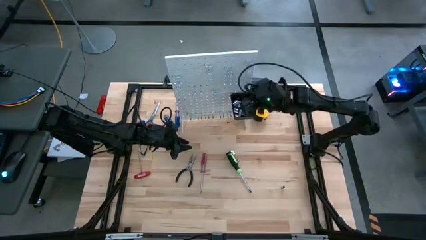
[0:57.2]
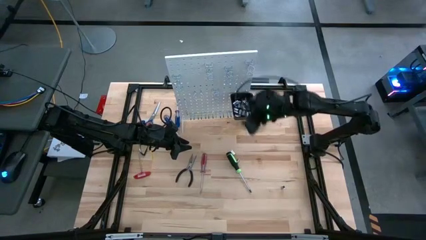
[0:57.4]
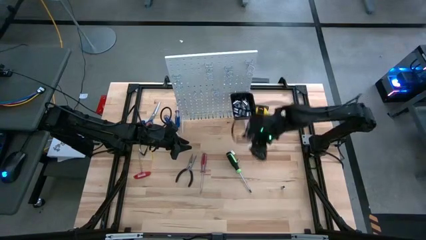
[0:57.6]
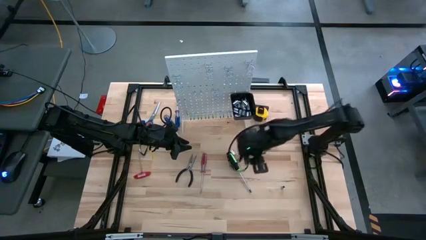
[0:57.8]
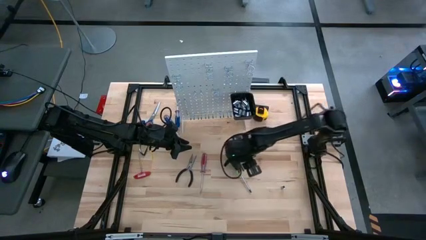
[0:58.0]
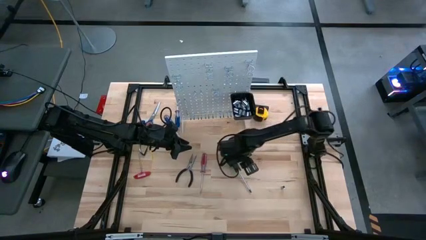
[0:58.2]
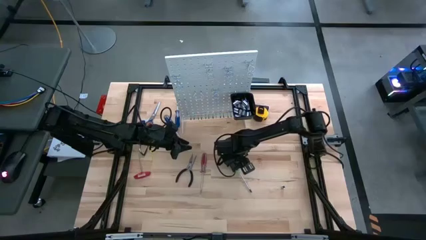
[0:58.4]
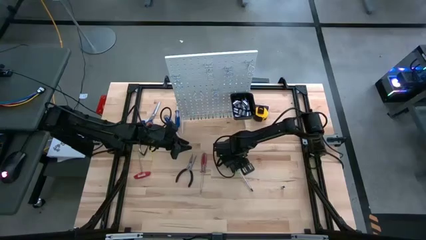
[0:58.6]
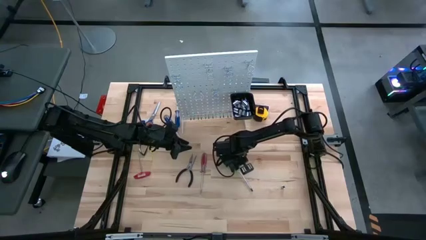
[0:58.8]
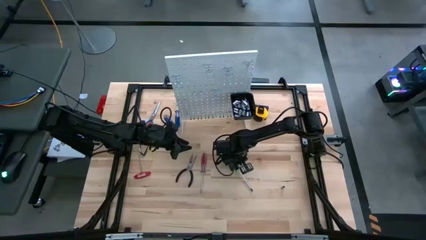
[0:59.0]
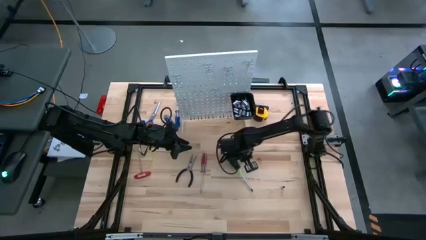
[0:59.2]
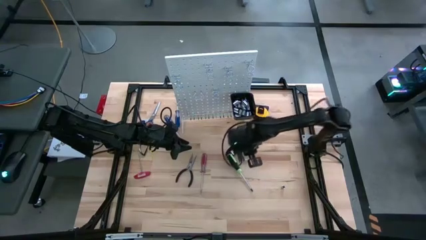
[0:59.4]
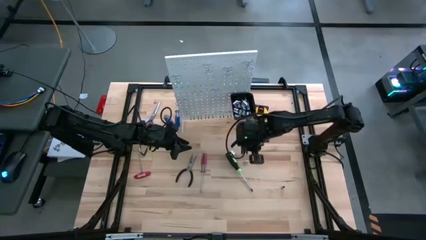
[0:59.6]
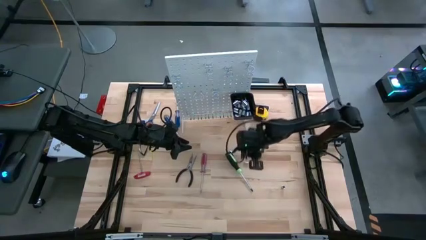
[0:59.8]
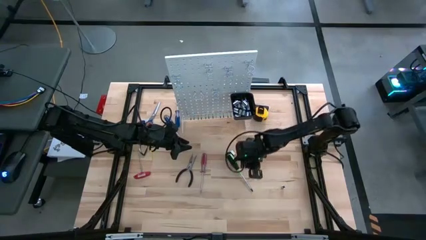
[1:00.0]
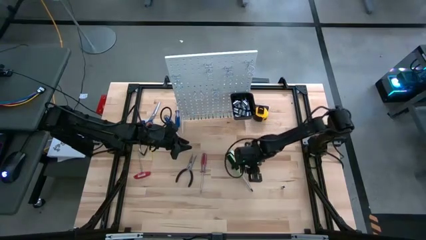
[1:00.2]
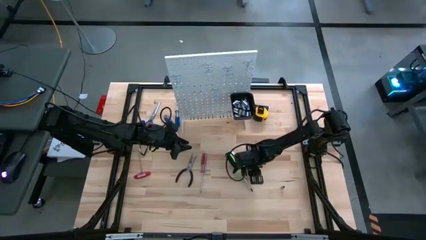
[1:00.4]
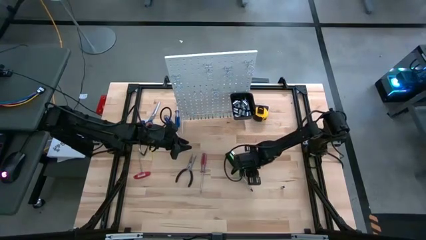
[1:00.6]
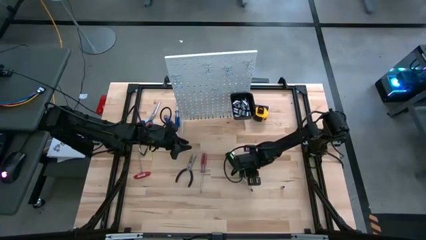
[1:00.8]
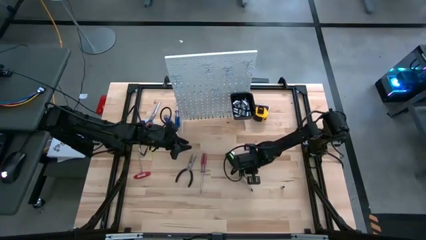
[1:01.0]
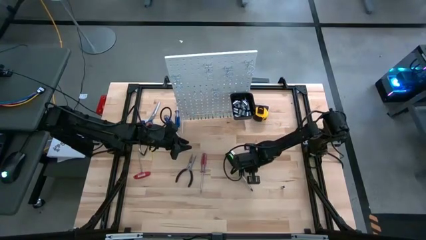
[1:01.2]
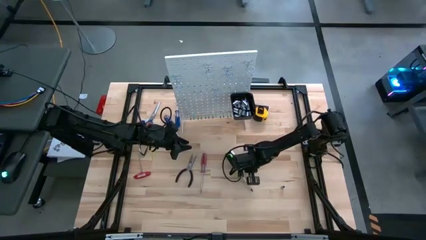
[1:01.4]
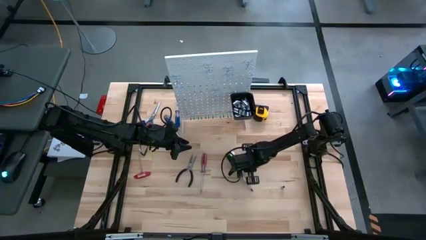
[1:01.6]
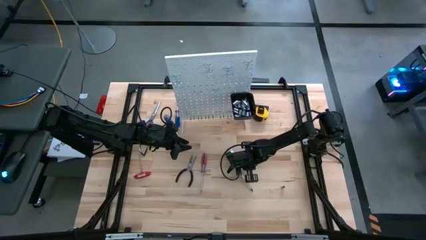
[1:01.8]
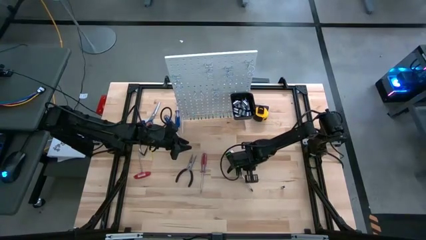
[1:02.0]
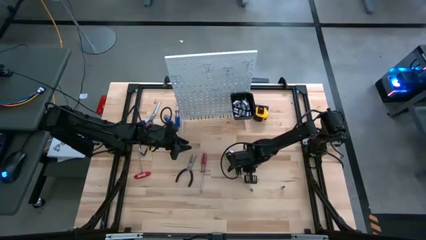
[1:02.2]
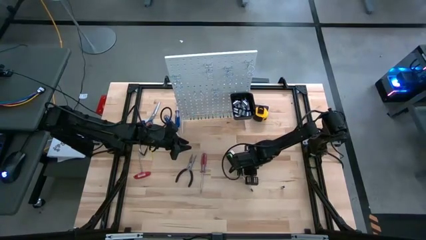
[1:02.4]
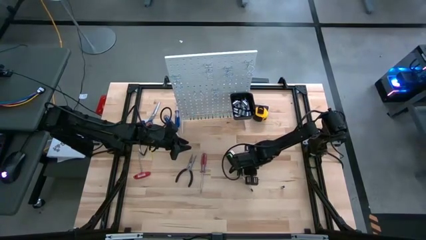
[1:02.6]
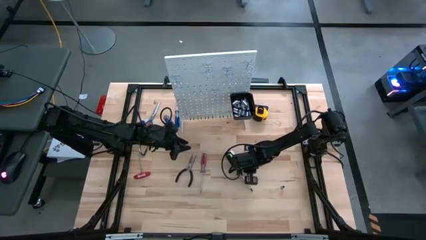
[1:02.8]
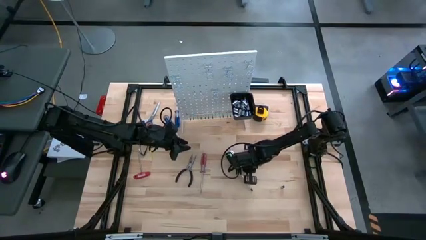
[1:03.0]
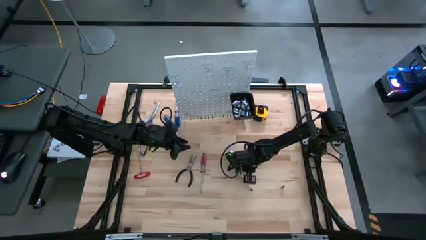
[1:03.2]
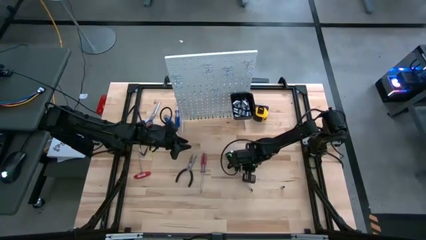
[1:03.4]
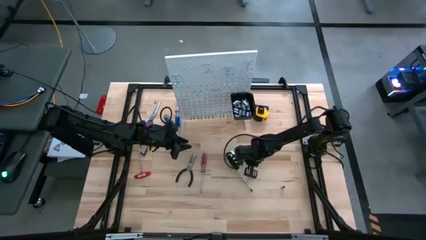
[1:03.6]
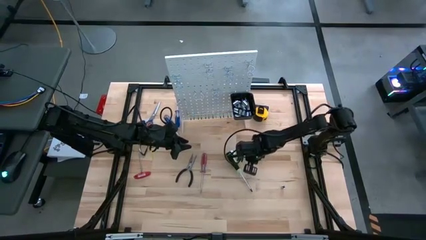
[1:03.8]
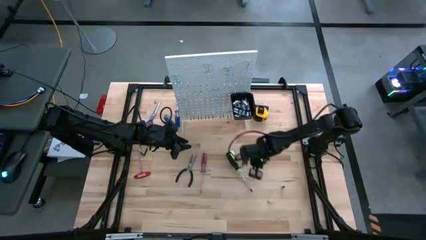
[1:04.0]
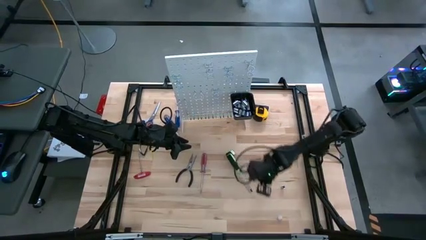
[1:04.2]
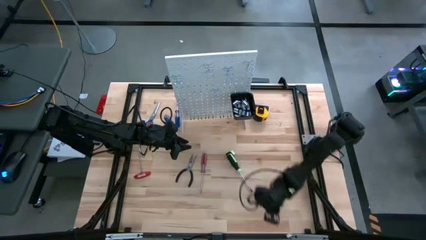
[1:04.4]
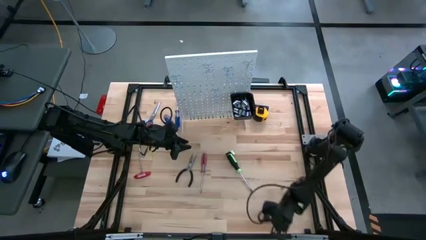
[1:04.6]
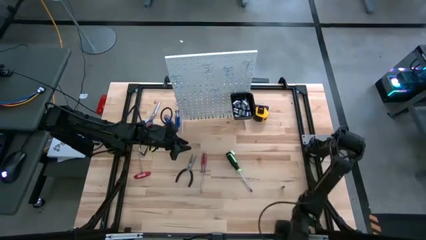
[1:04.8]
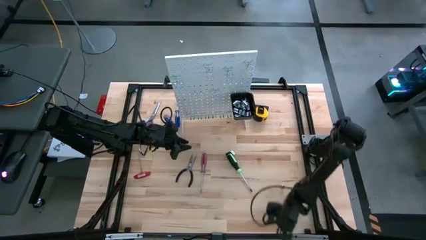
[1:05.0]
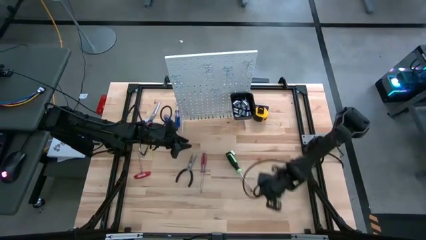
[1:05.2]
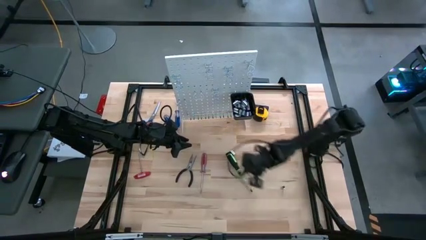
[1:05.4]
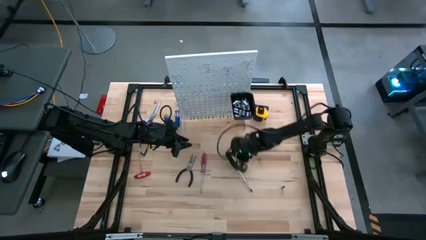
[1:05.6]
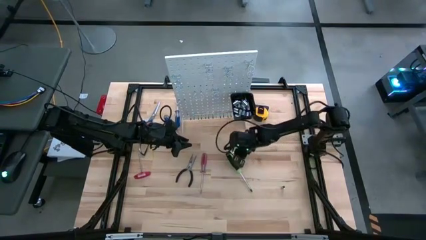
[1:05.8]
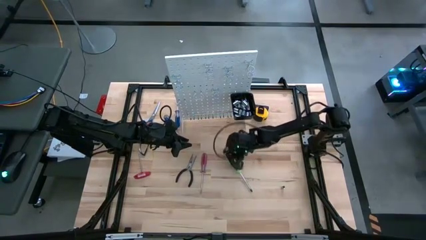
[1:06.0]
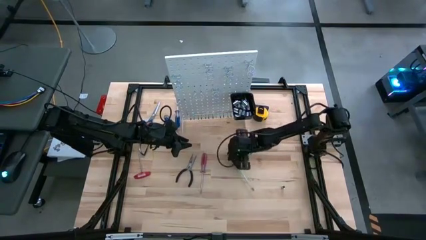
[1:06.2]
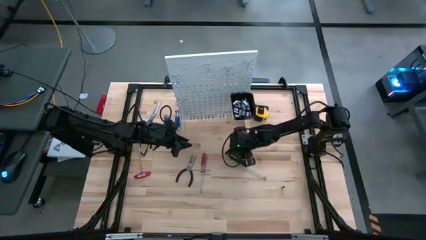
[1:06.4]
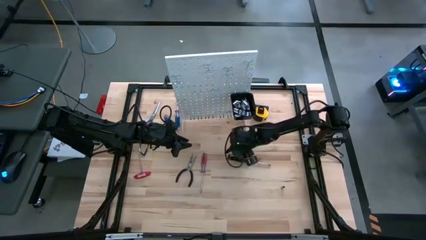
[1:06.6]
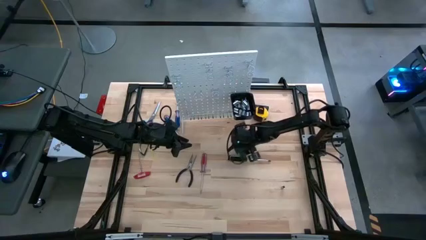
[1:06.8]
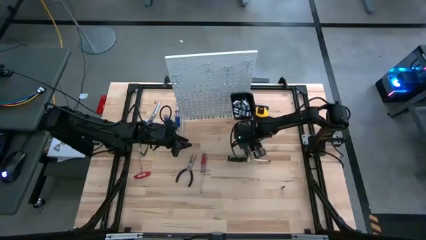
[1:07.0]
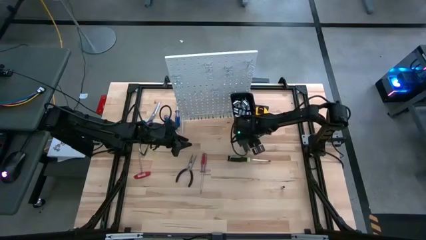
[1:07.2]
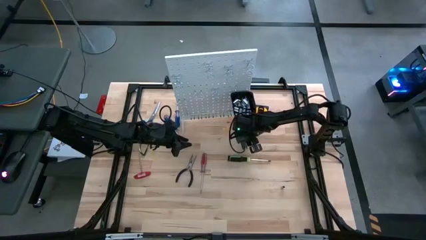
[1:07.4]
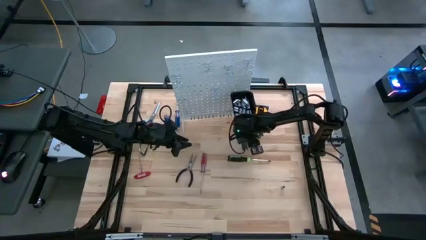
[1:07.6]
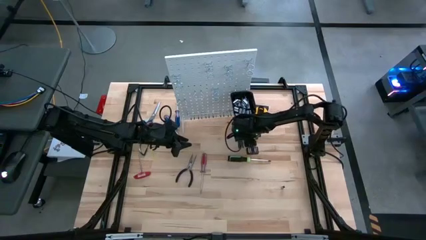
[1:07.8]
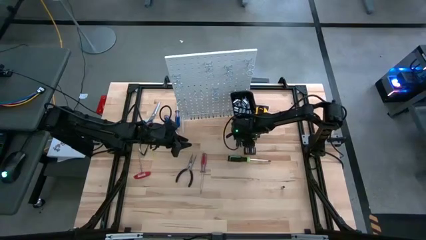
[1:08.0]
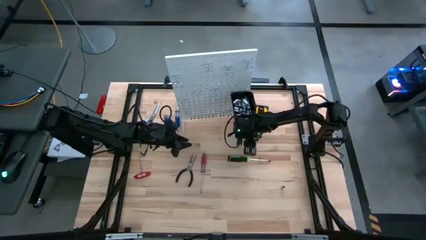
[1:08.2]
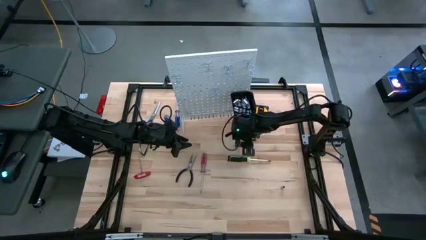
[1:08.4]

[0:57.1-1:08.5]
Task: Hang tools onto peg board
Put the silver socket into the black bin on the peg board

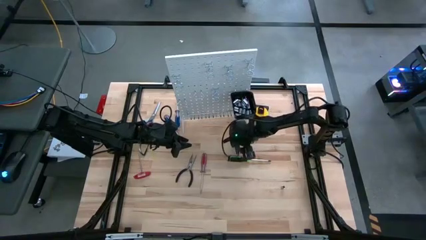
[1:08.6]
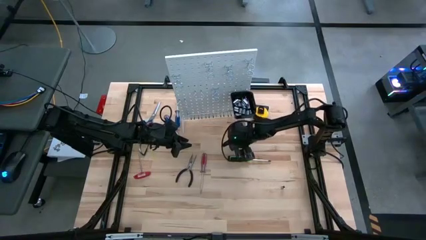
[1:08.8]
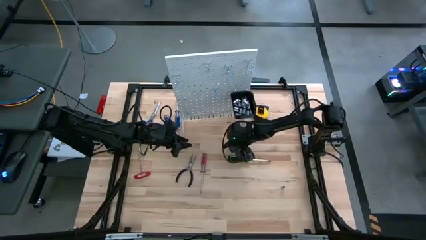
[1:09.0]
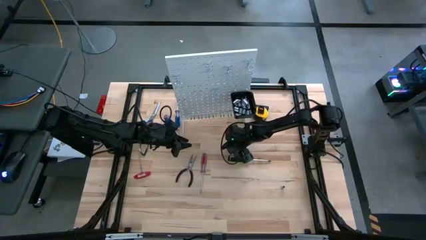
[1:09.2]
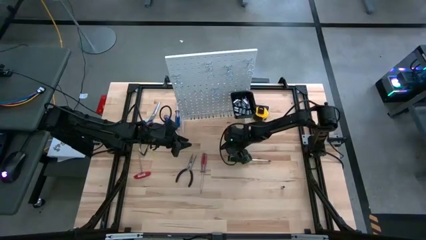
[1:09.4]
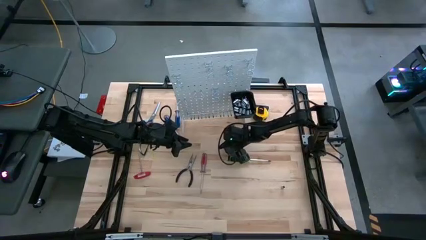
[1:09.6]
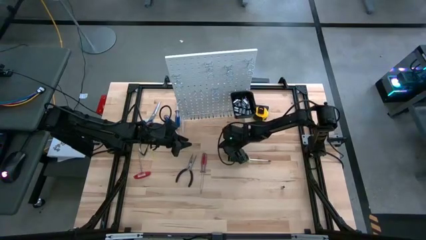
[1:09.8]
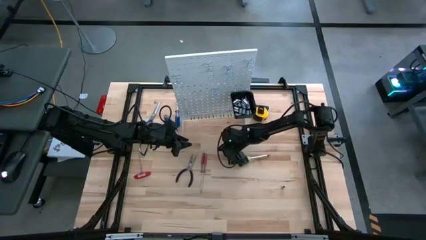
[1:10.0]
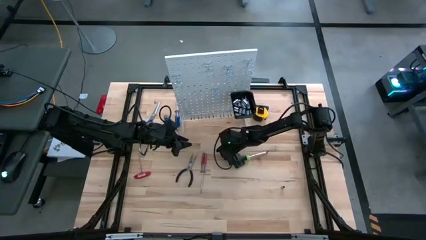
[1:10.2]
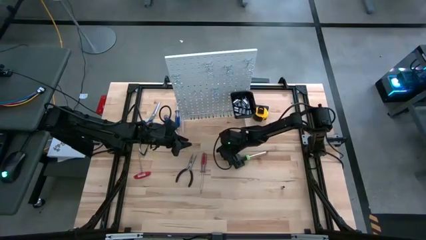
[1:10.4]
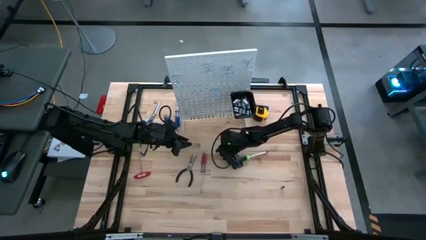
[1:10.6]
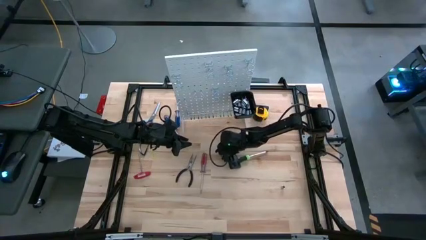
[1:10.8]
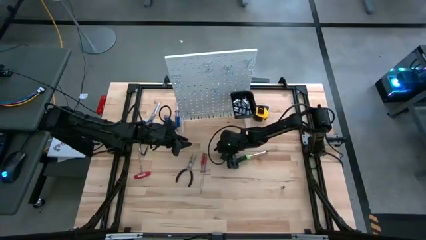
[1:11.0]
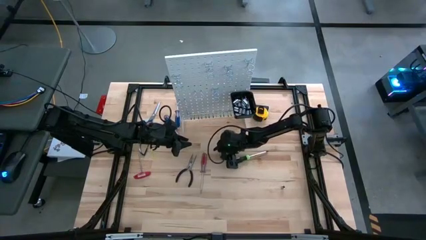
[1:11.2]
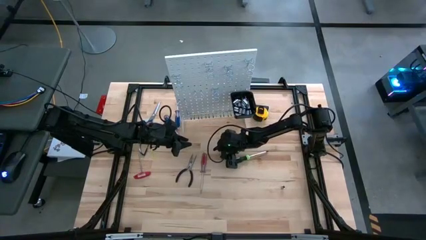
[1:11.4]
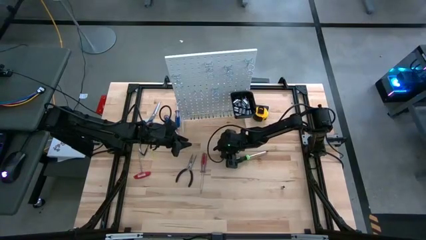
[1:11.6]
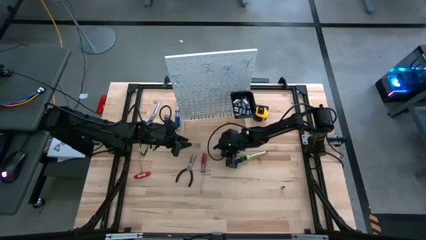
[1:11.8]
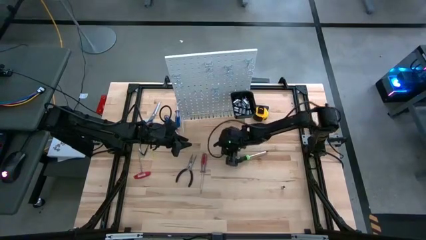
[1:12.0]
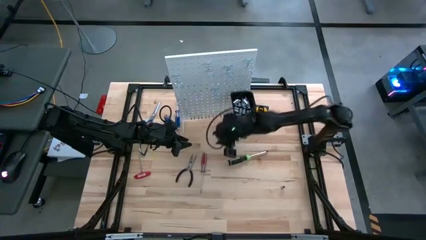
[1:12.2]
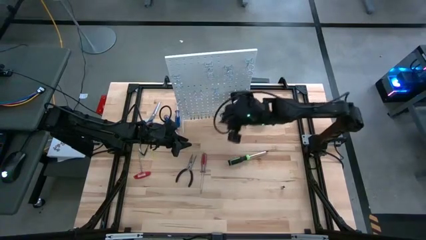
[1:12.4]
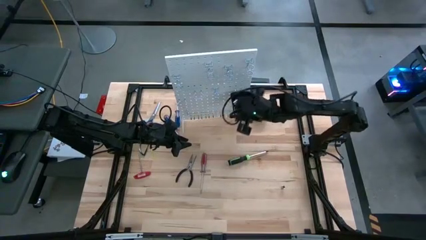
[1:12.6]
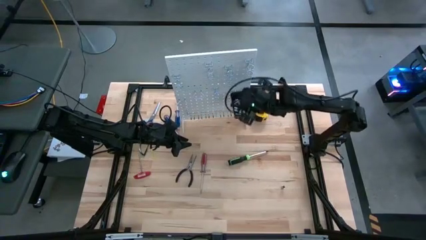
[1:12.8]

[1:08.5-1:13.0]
Put the silver socket into the black bin on the peg board

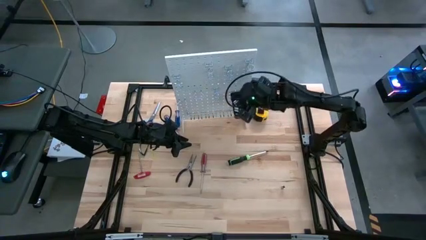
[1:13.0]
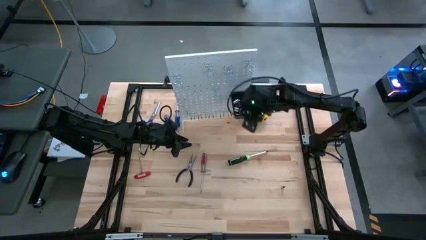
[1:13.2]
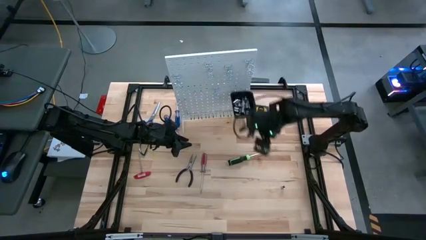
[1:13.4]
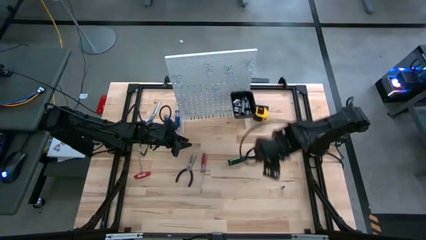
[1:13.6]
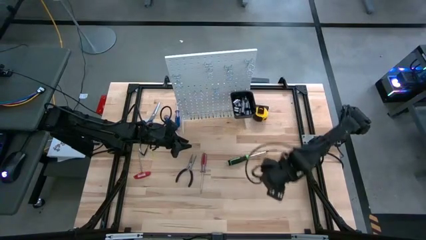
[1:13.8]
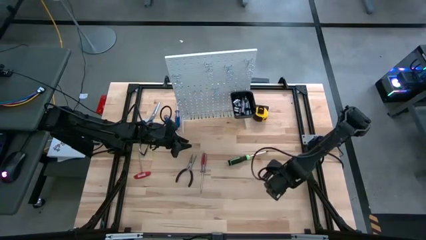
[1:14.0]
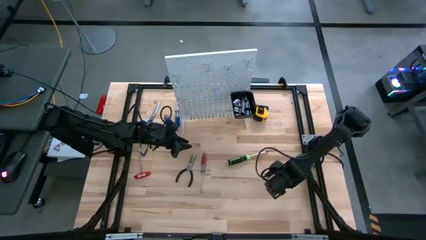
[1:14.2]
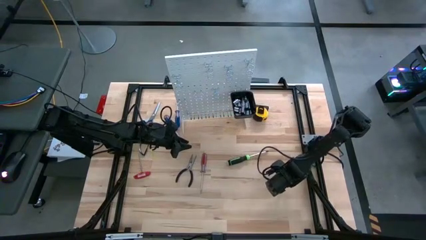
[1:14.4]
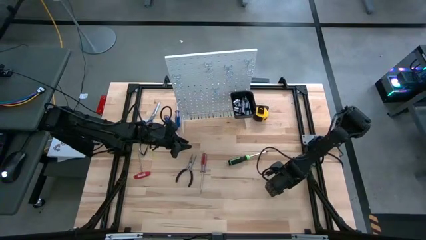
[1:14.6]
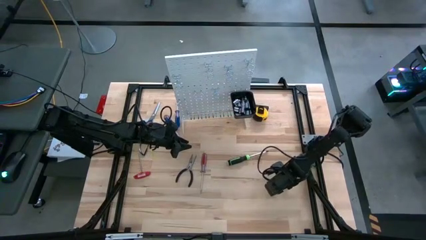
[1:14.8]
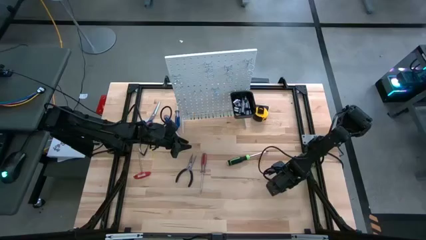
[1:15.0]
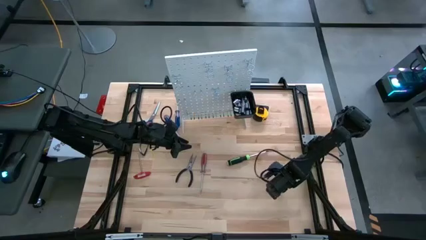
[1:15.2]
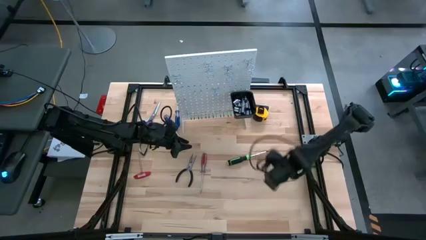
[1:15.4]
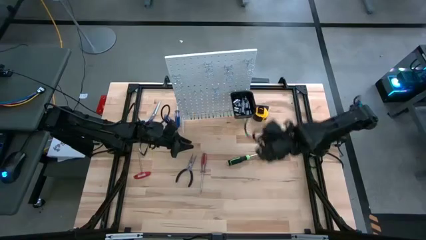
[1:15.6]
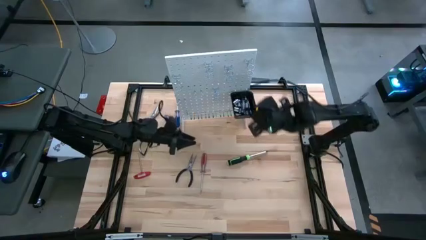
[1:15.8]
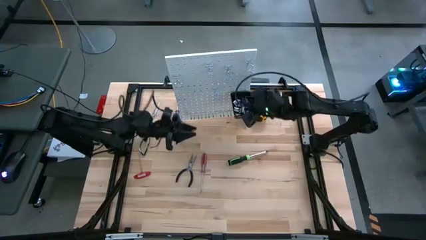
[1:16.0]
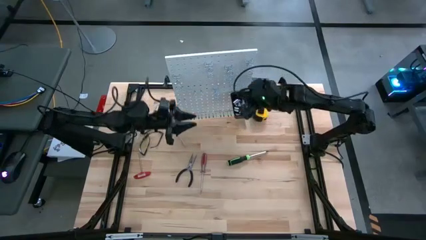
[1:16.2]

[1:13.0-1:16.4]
Put the silver socket into the black bin on the peg board
